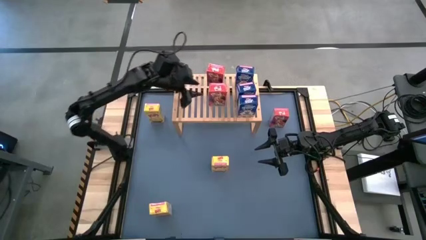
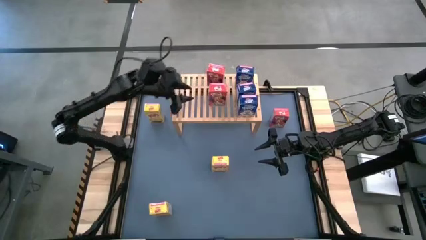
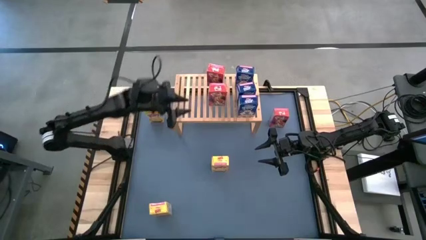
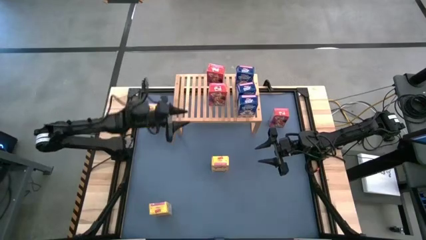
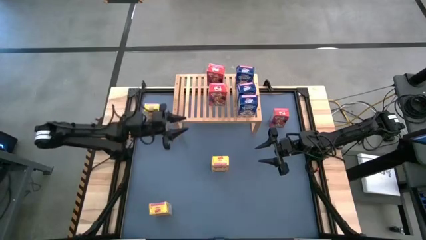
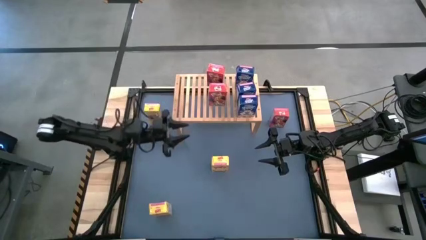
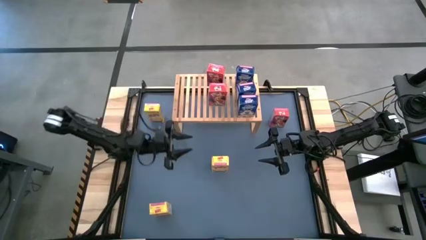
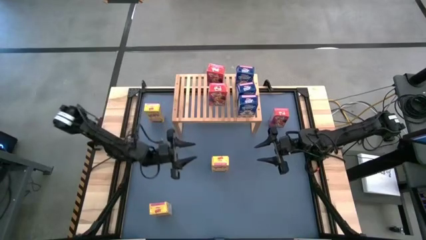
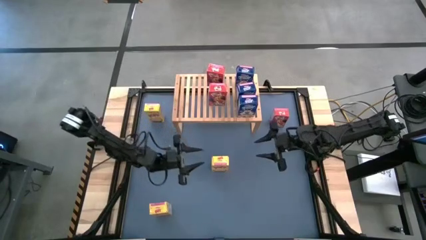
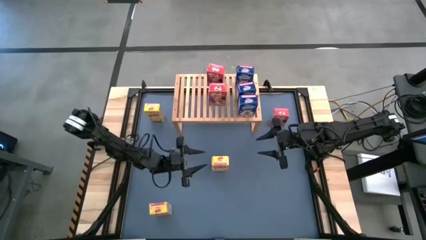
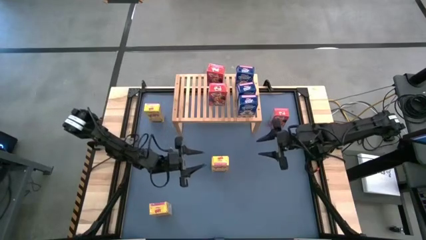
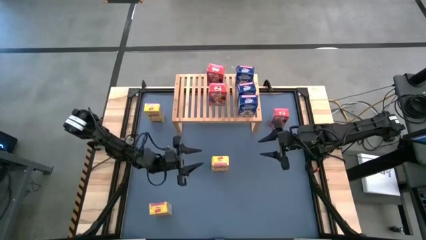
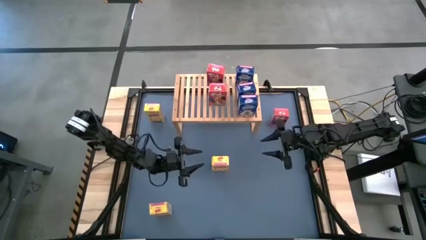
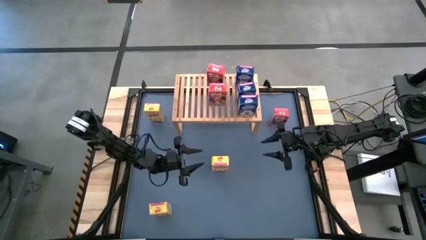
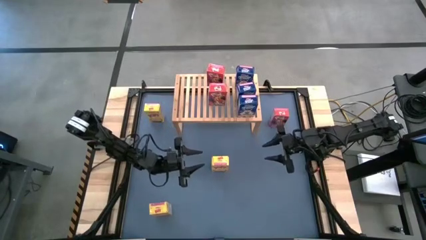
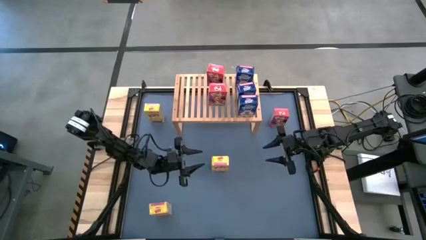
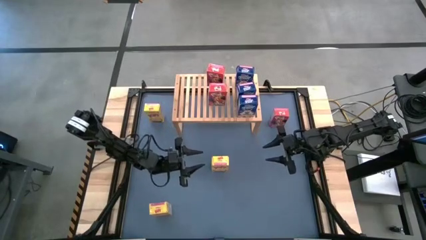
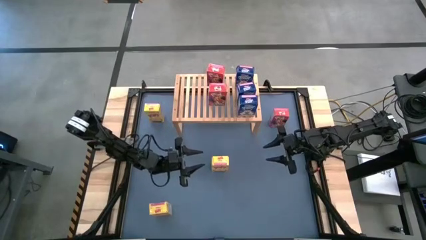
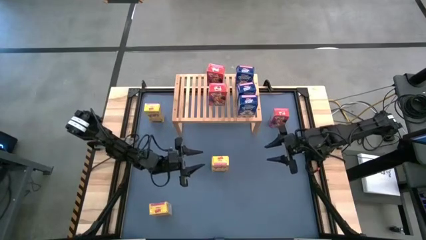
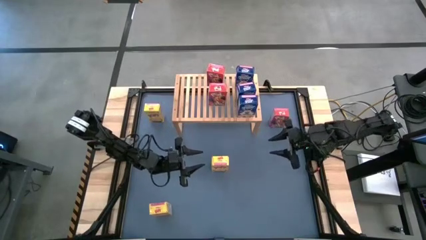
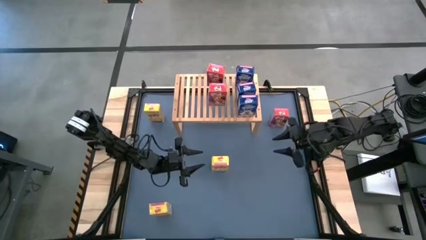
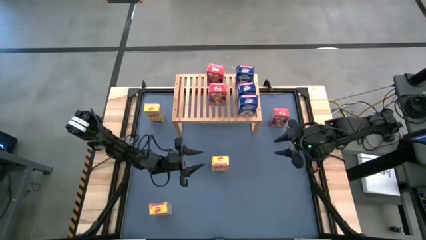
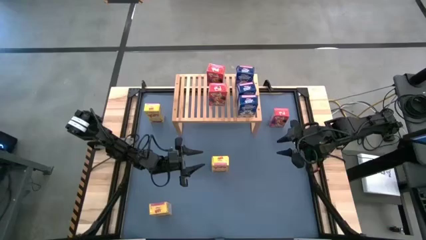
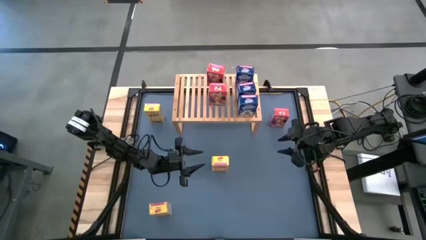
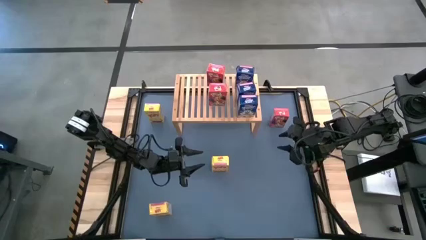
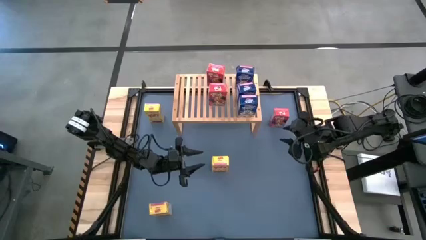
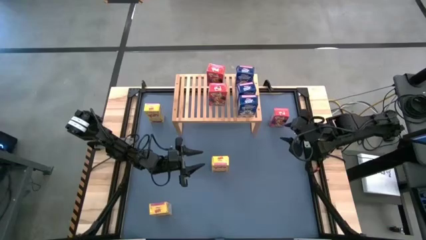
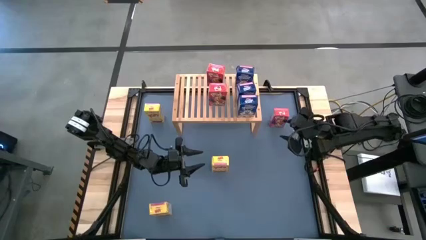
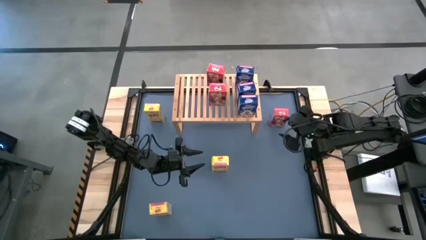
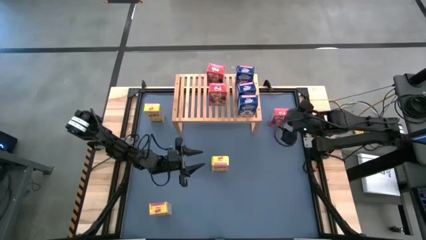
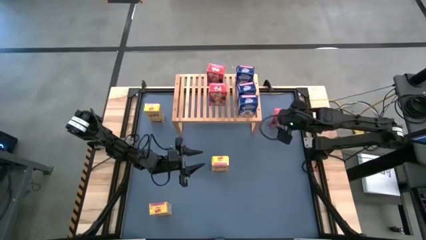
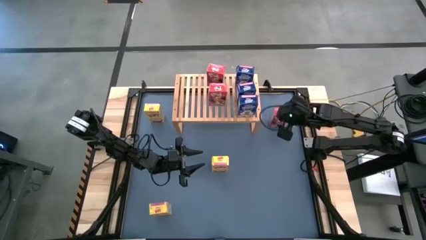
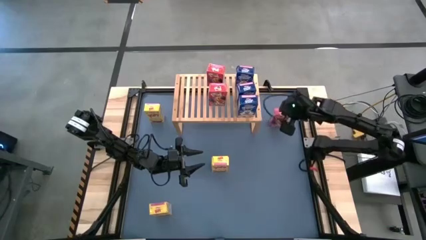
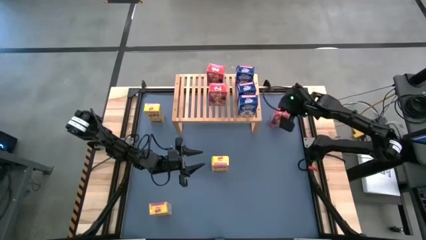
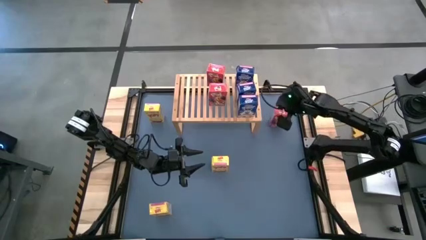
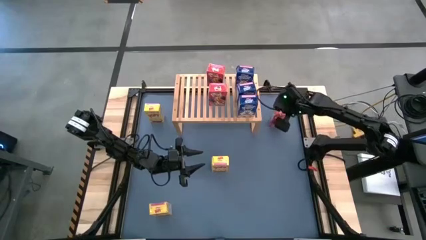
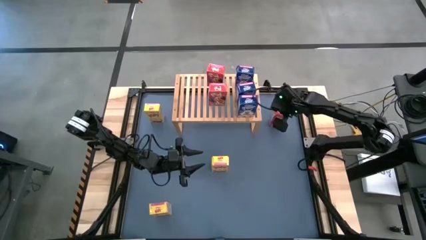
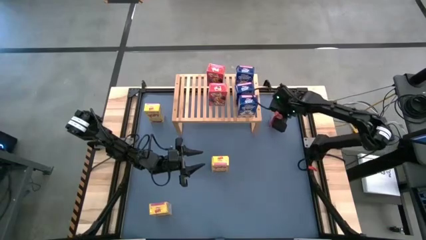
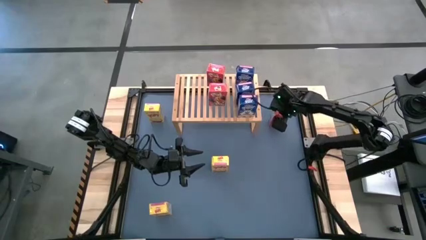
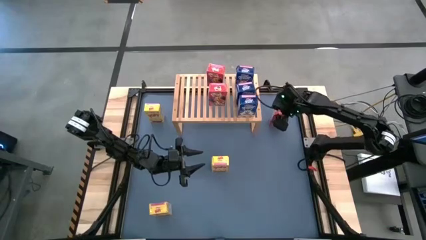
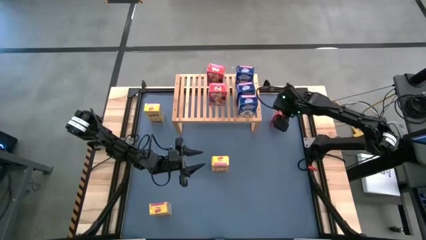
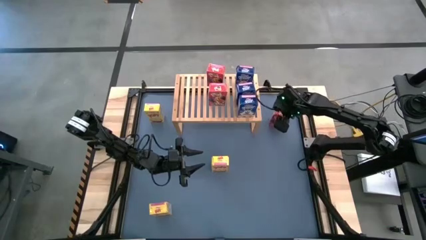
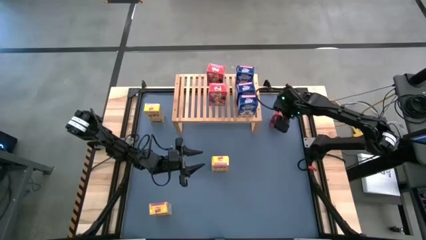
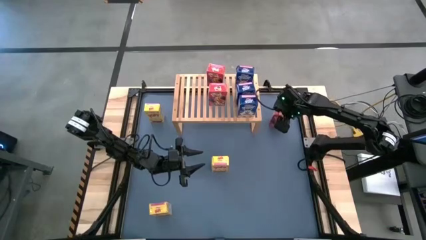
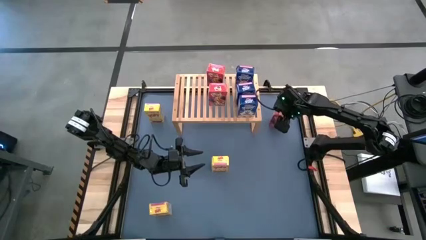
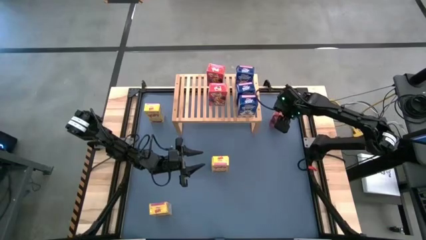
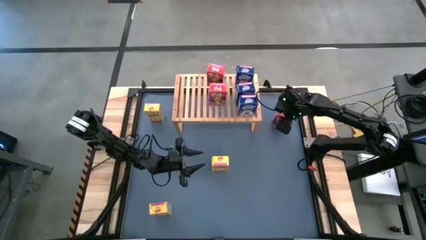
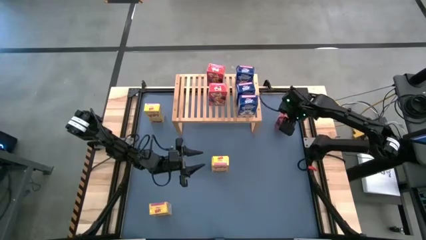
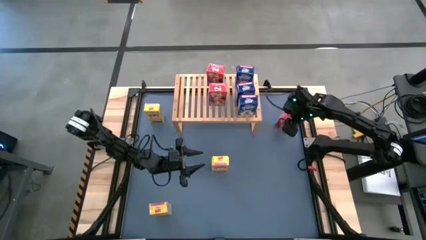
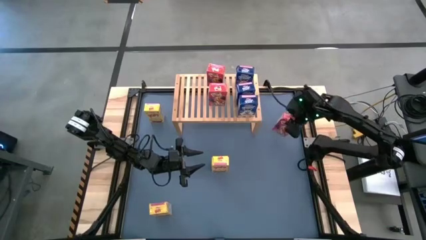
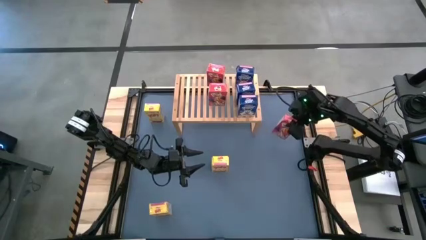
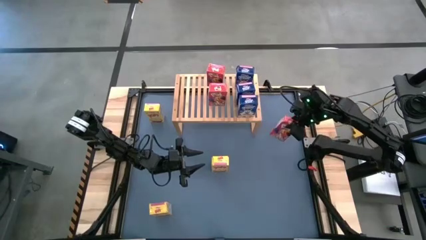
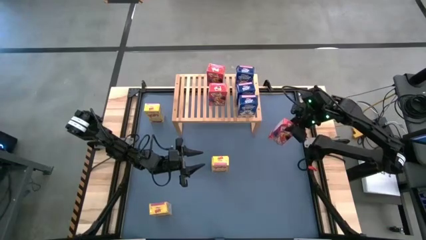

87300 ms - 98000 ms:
Task: Stack cereal on shelf
Put the red cereal box on the shelf aligned with the other red cereal box
